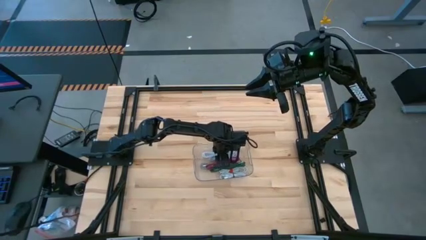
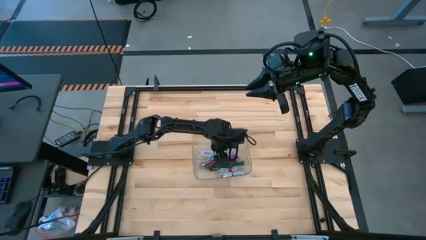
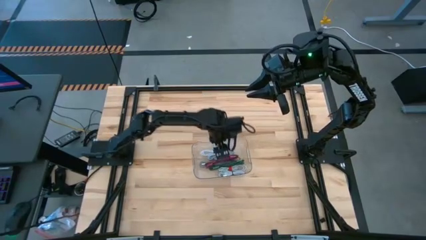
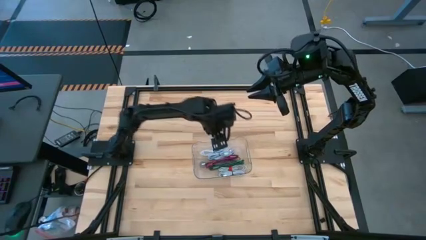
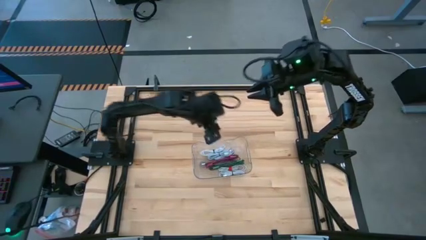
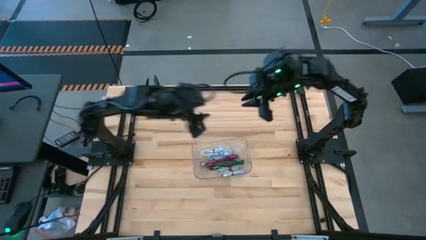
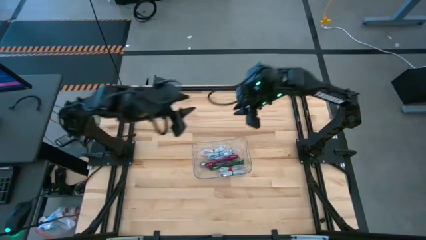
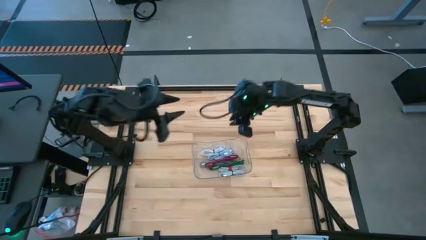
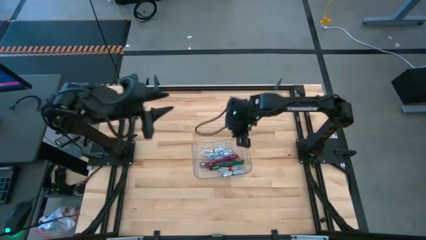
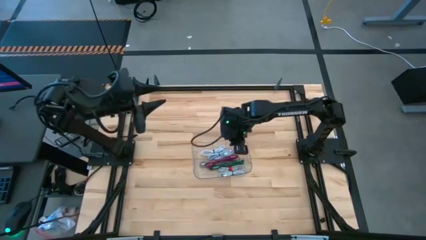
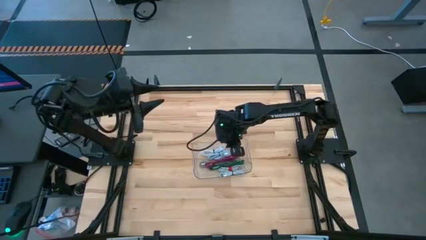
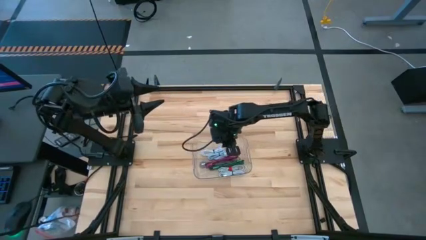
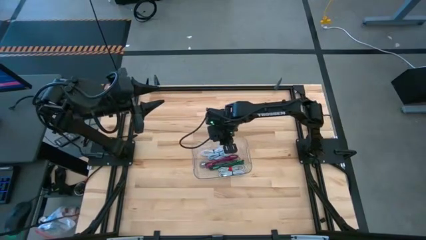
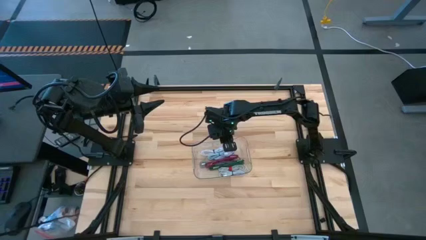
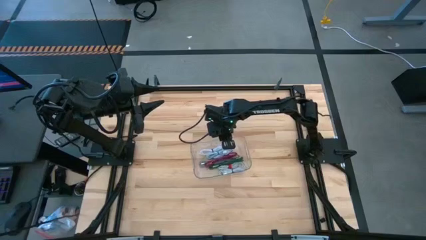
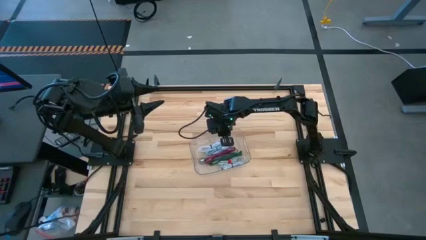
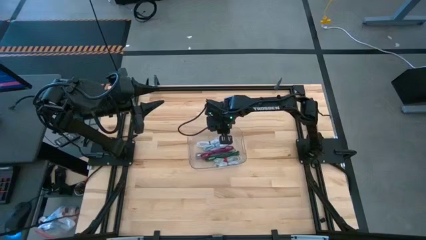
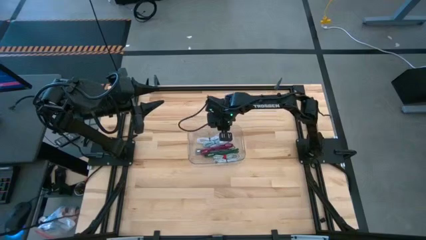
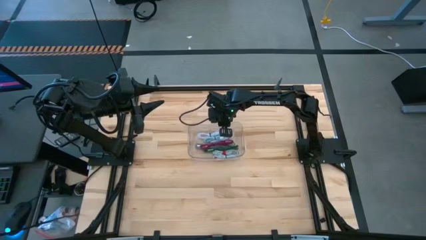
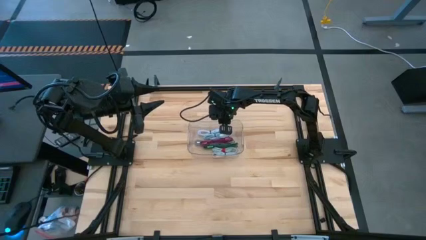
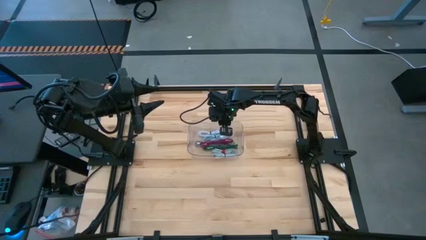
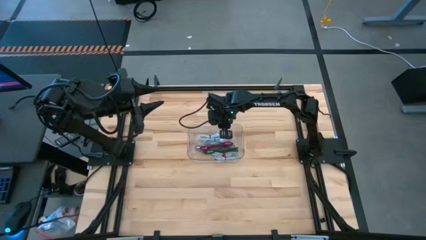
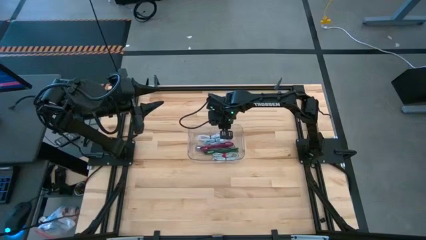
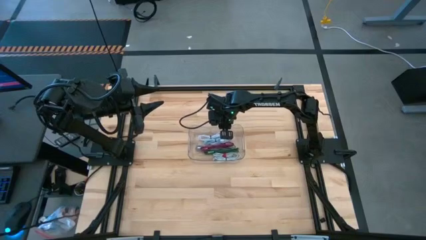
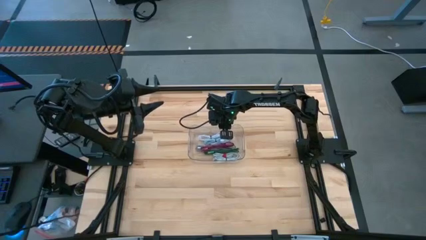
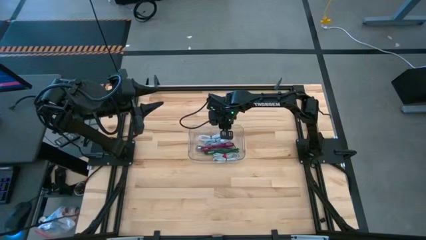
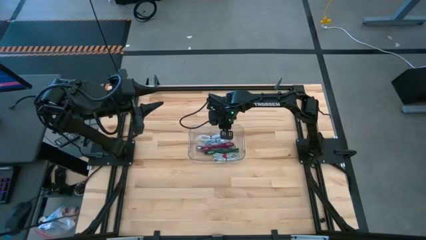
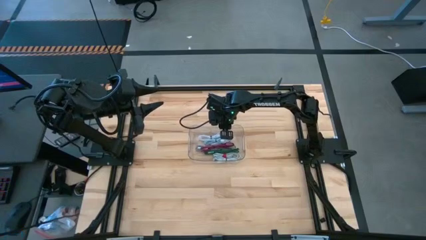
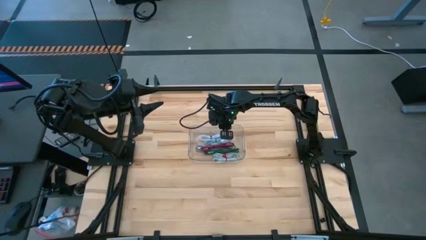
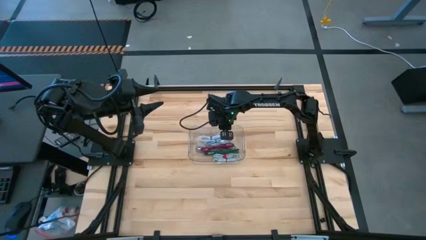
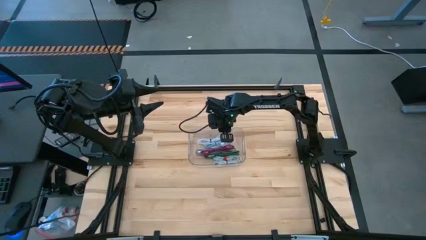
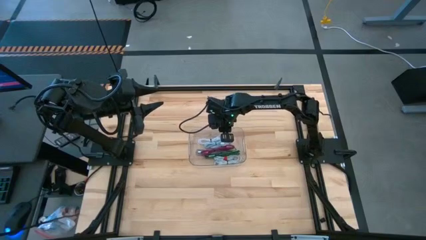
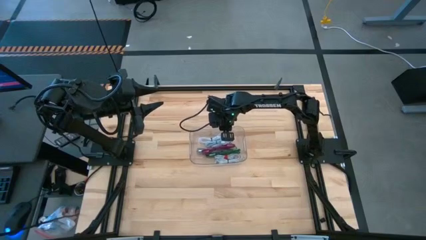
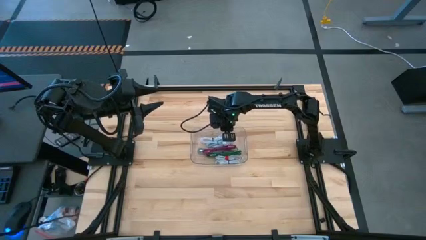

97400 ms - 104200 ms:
Task: Pick and place USB-C Cables
Adjust the transparent bin

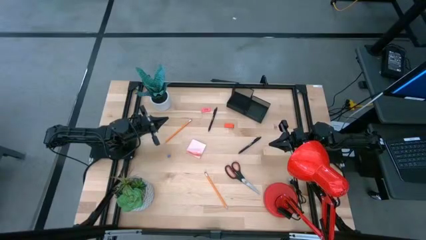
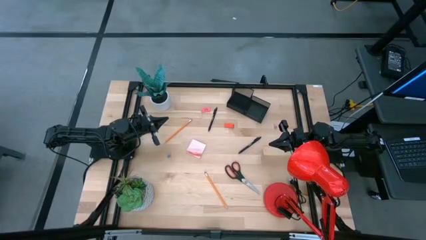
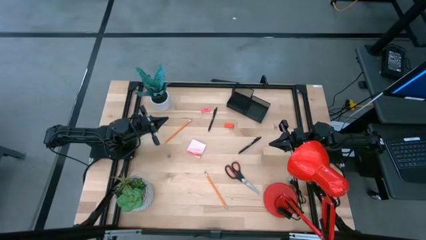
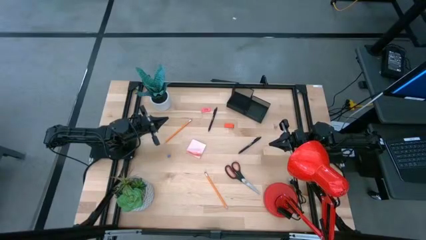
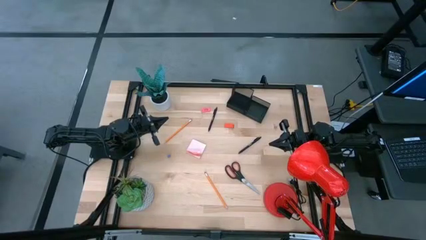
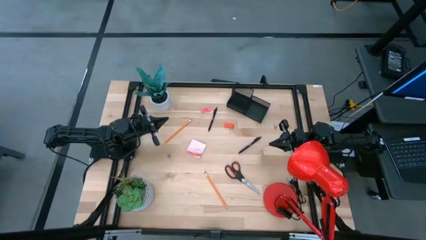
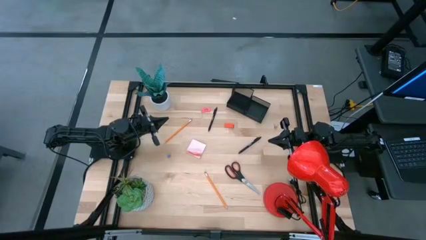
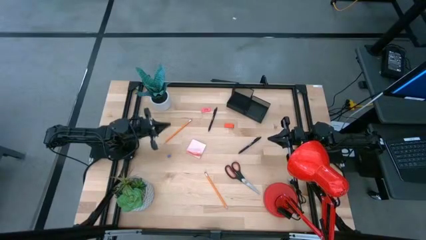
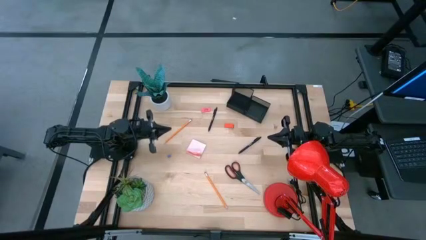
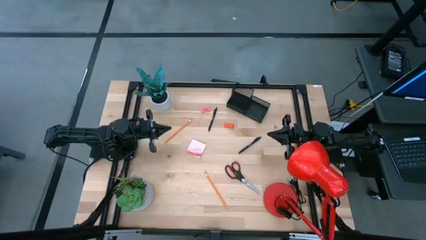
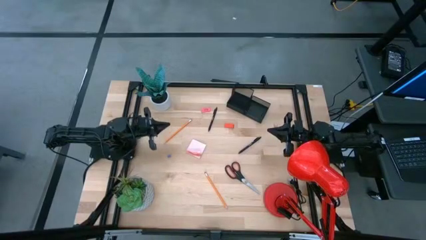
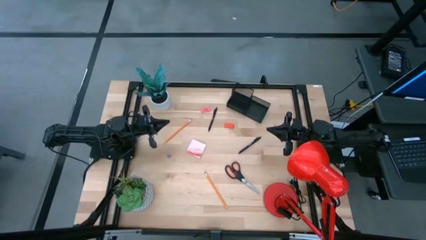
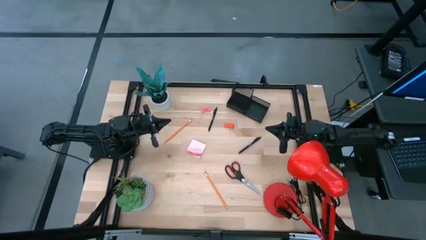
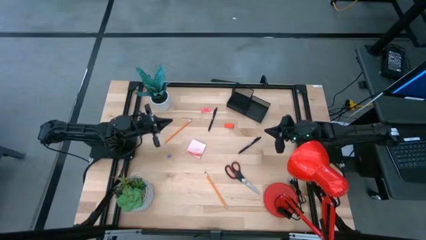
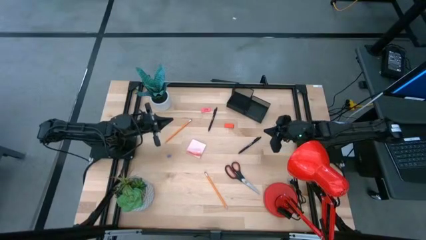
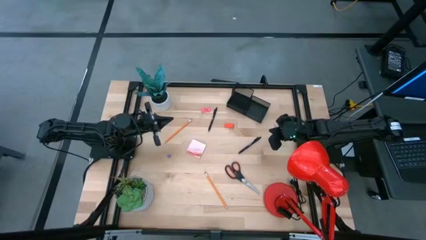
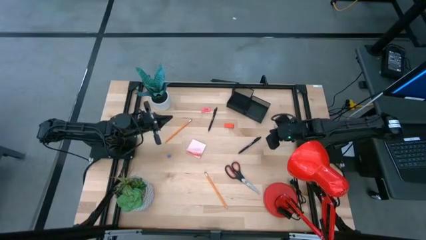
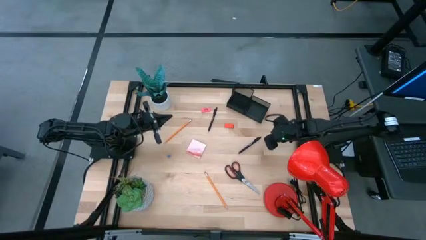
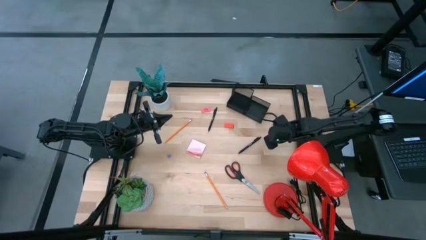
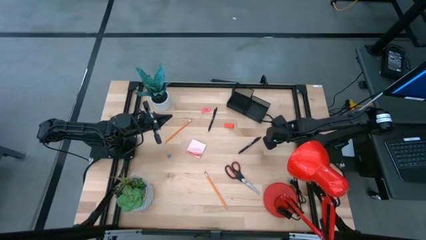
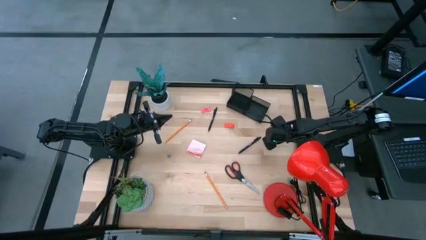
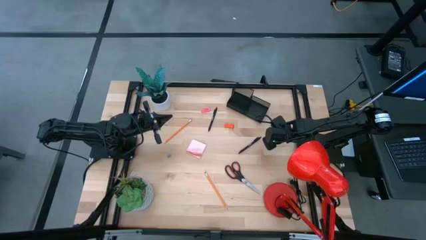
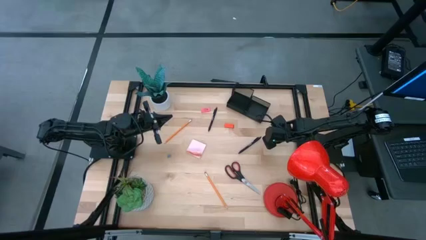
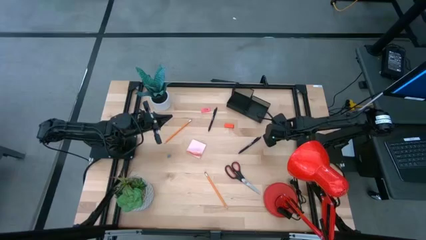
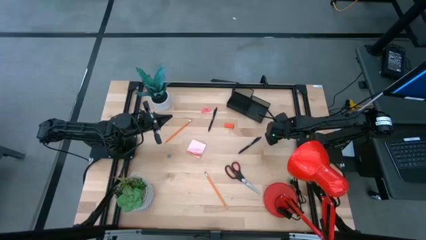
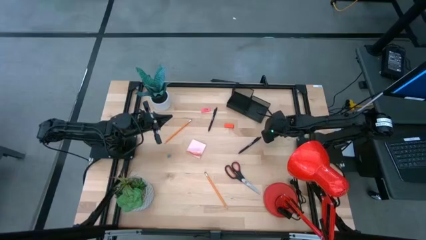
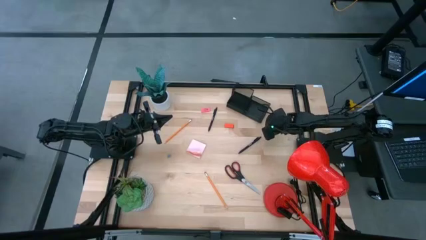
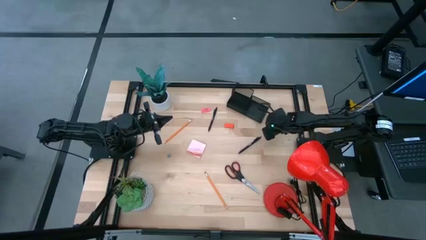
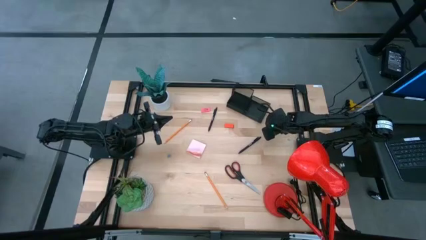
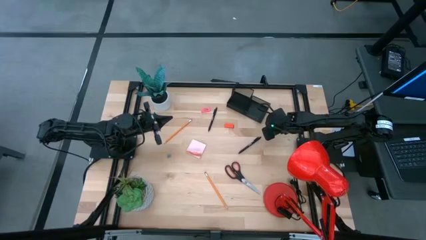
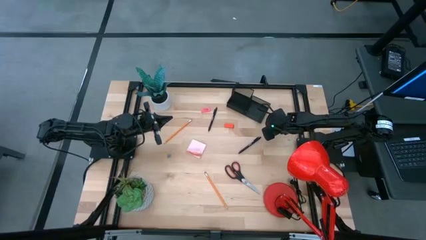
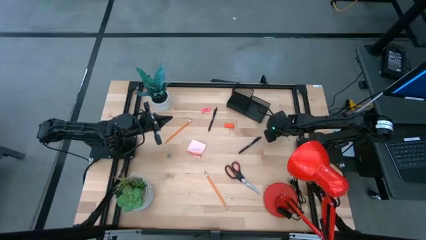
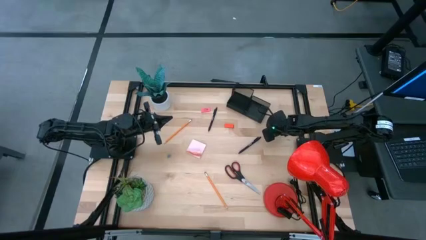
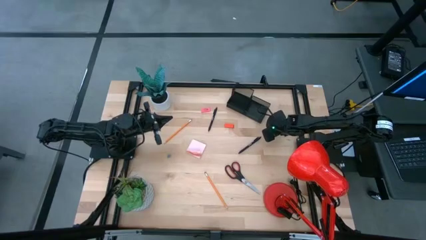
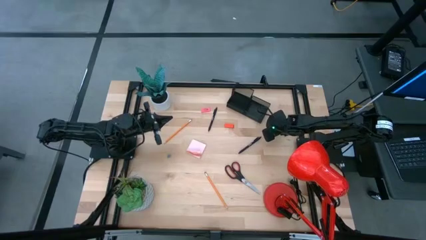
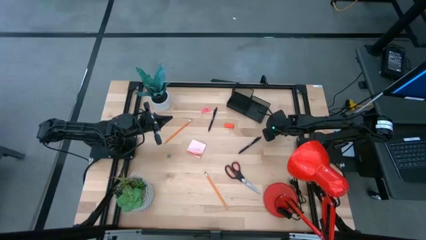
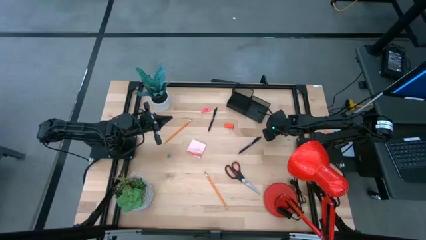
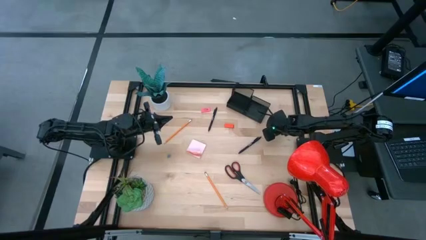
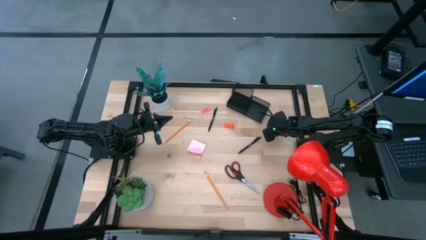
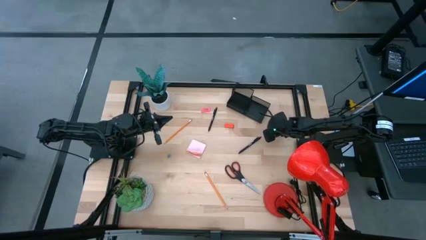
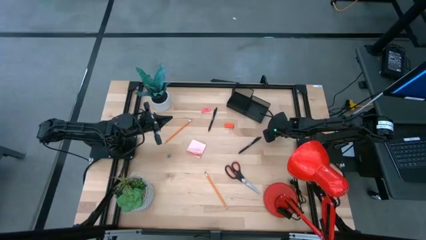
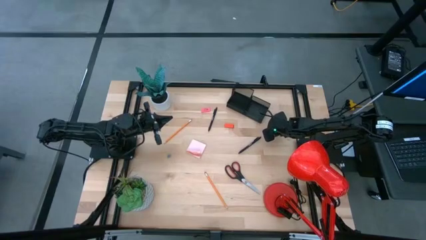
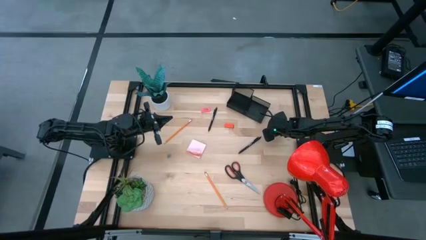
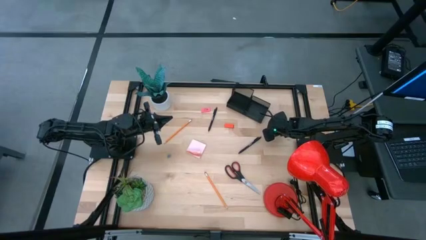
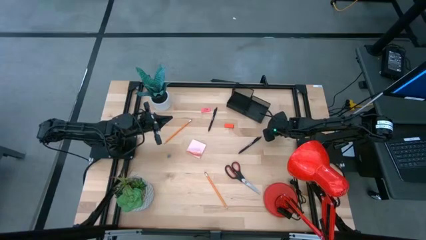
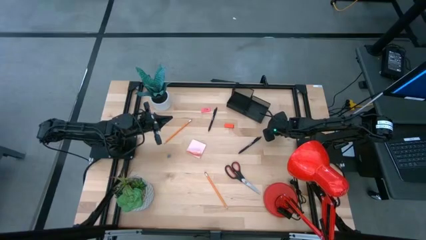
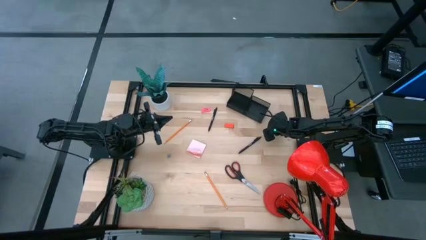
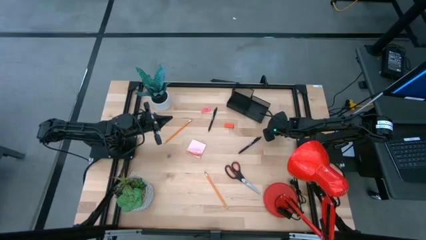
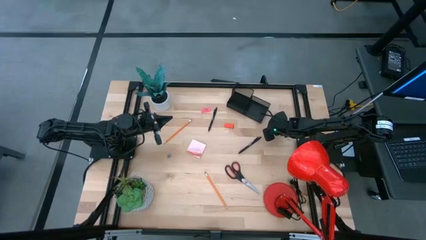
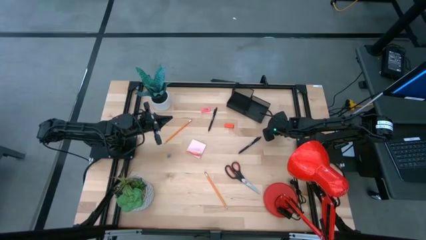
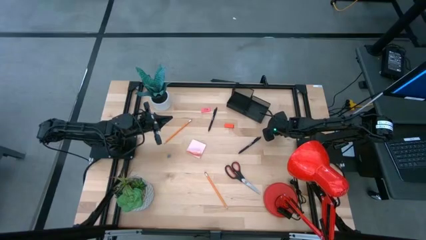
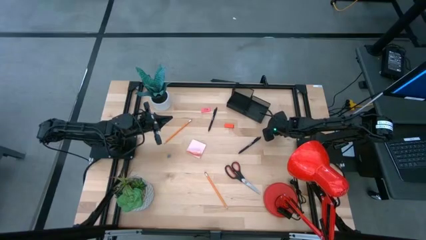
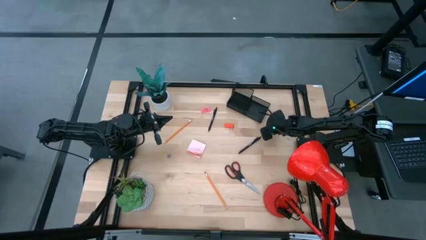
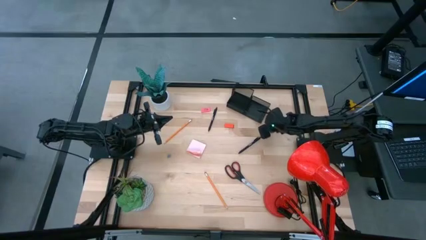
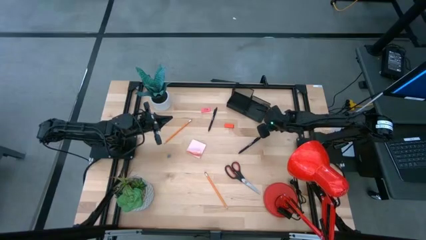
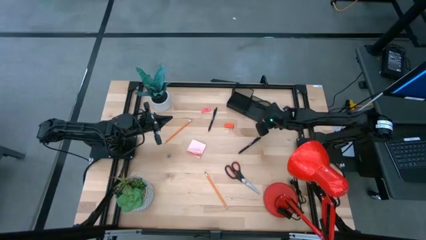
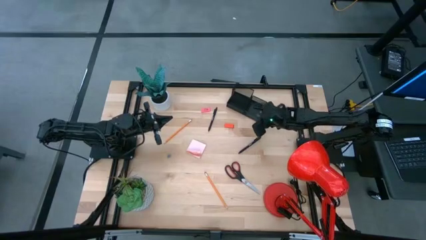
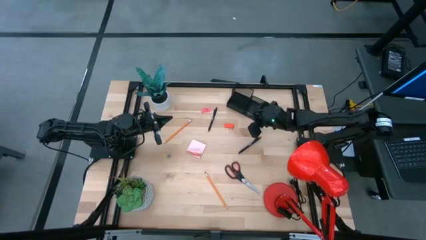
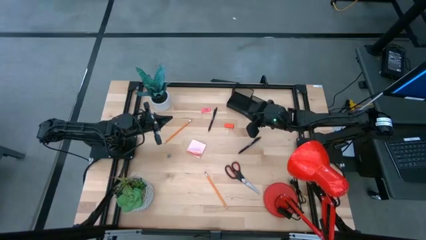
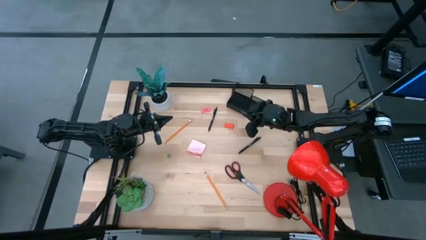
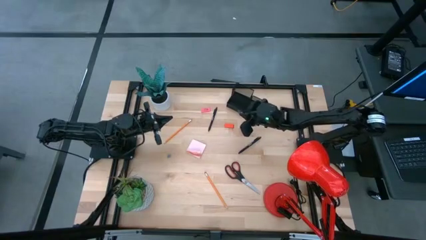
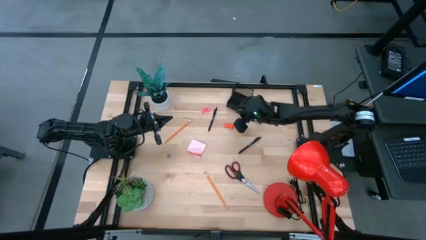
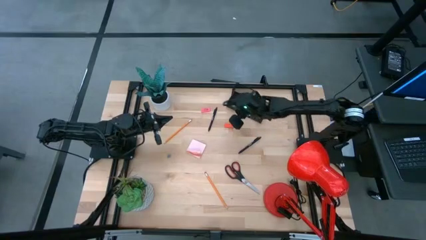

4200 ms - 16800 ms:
Task: Pick and place office supplies into organizer
Put the pink binder clip into the black desk organizer
